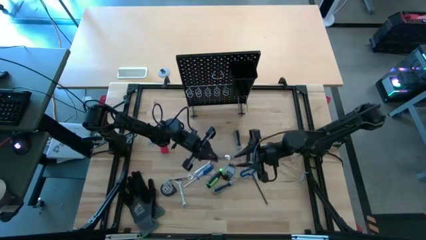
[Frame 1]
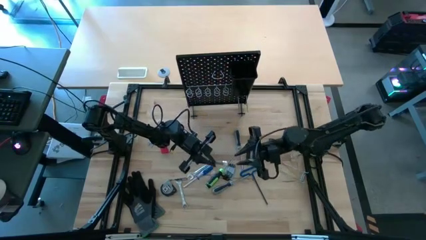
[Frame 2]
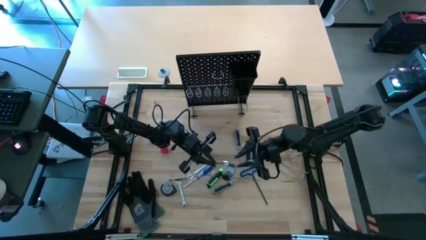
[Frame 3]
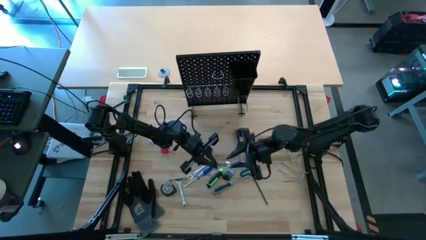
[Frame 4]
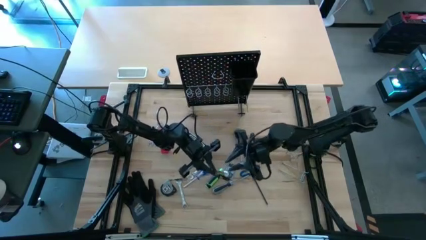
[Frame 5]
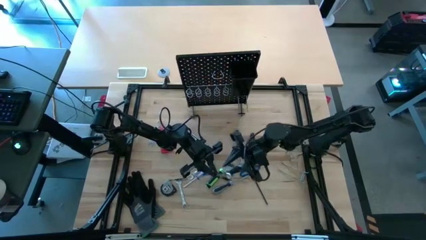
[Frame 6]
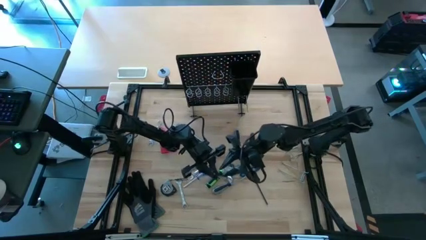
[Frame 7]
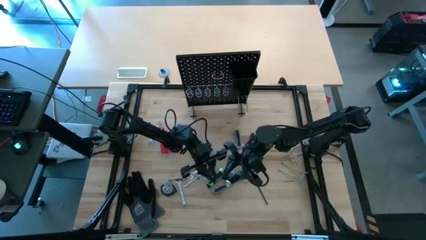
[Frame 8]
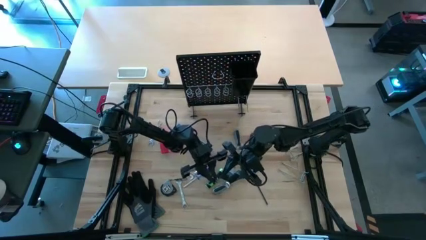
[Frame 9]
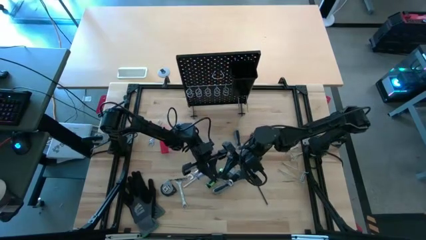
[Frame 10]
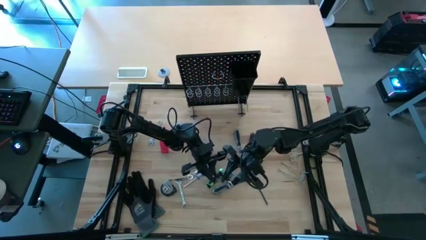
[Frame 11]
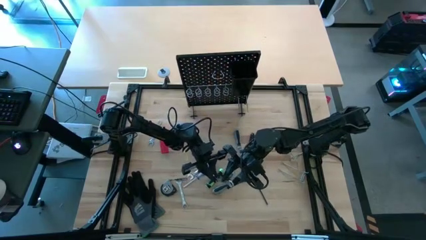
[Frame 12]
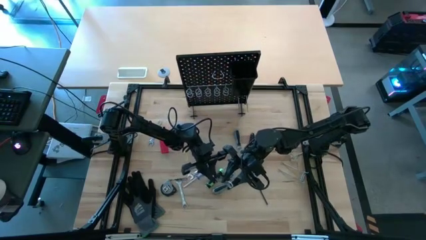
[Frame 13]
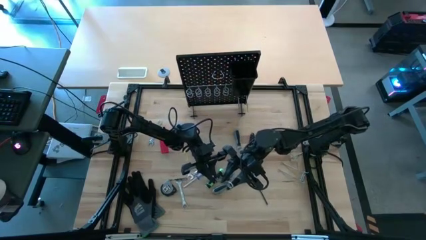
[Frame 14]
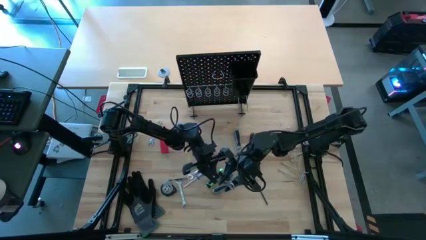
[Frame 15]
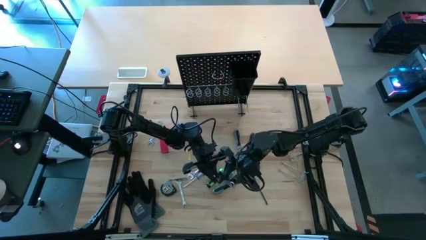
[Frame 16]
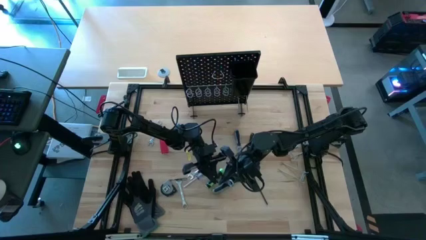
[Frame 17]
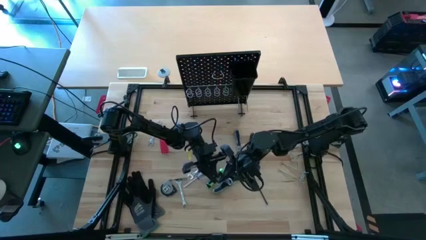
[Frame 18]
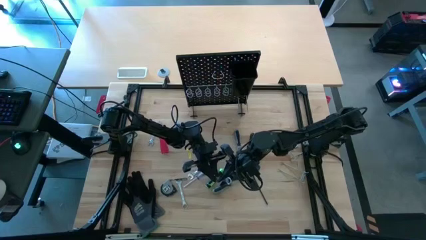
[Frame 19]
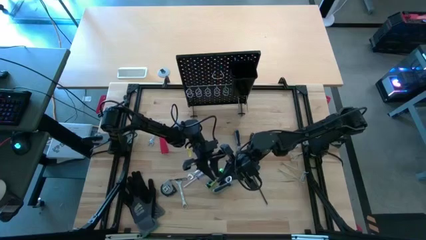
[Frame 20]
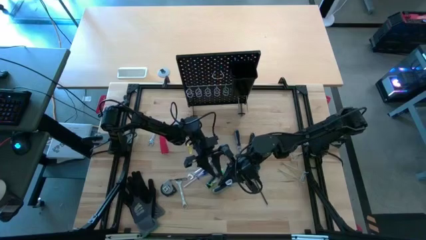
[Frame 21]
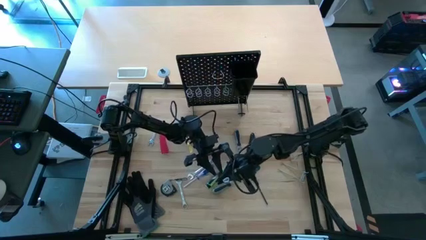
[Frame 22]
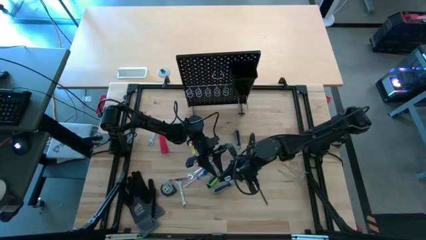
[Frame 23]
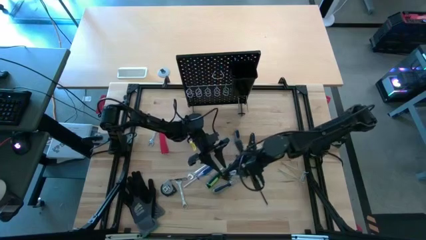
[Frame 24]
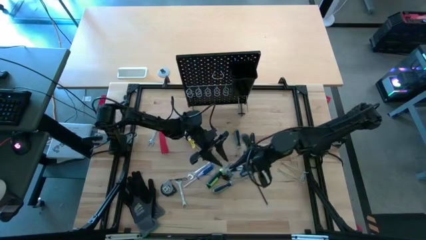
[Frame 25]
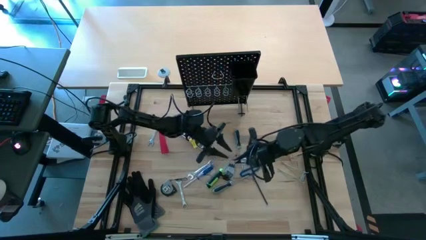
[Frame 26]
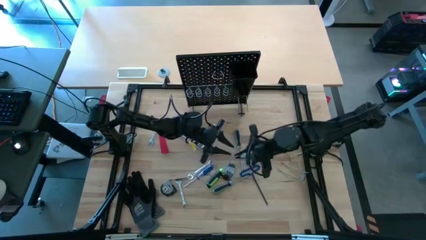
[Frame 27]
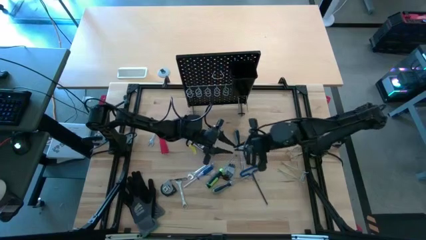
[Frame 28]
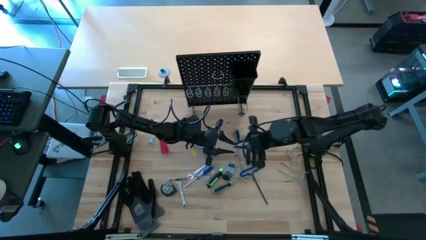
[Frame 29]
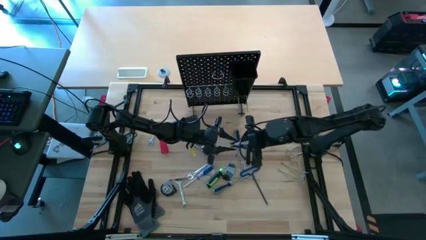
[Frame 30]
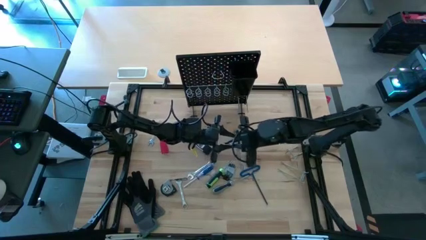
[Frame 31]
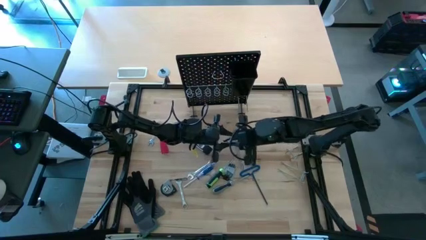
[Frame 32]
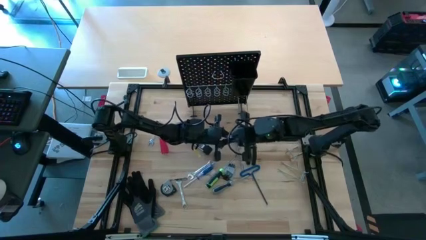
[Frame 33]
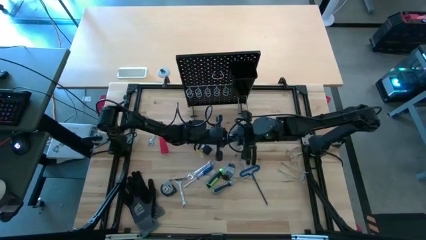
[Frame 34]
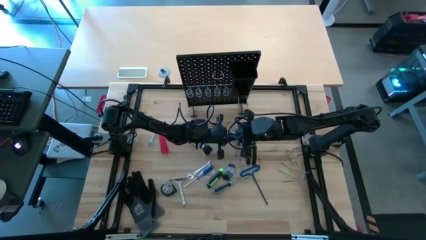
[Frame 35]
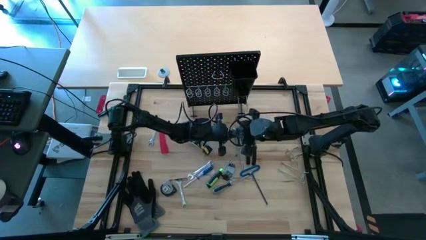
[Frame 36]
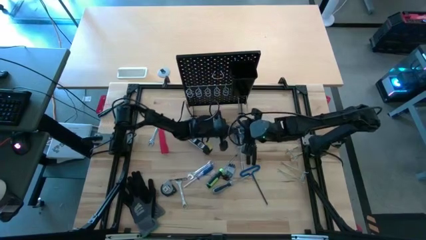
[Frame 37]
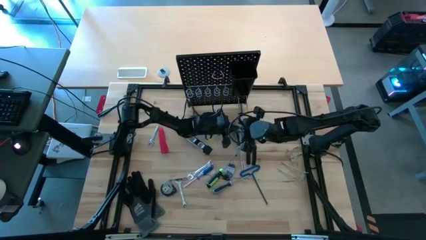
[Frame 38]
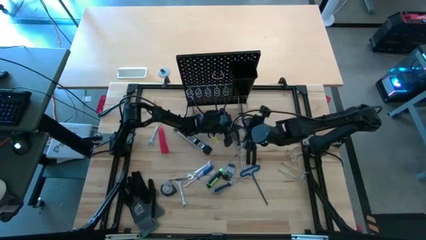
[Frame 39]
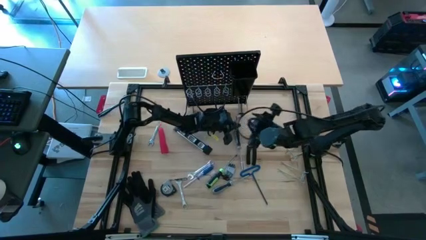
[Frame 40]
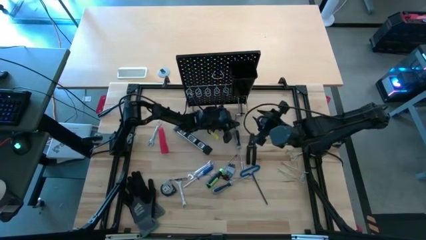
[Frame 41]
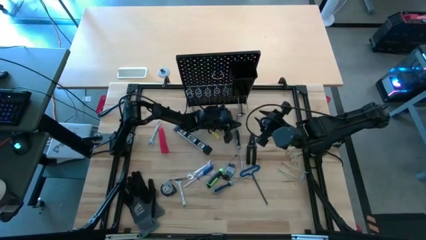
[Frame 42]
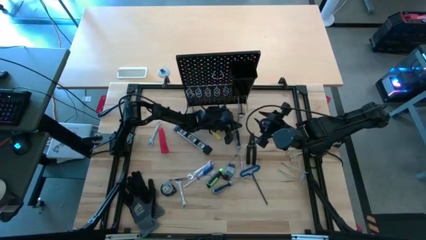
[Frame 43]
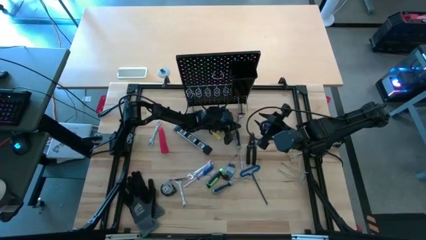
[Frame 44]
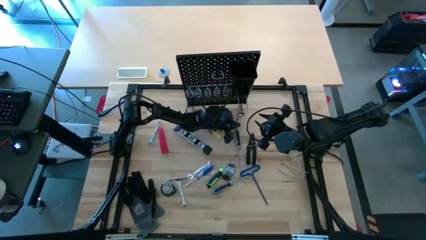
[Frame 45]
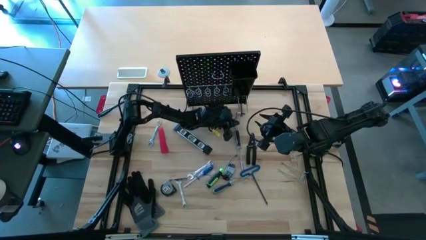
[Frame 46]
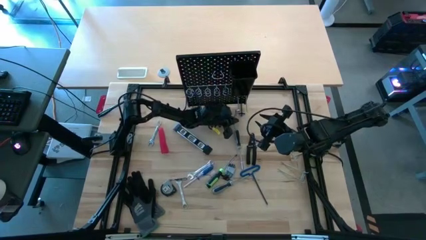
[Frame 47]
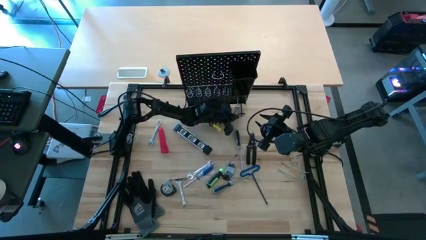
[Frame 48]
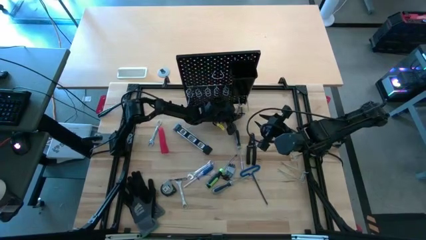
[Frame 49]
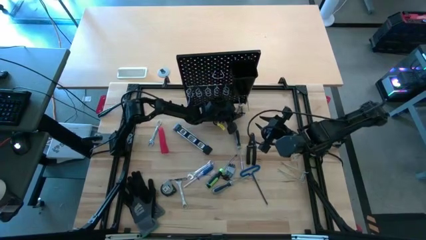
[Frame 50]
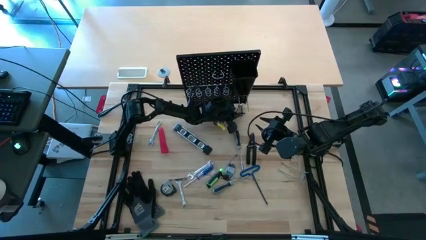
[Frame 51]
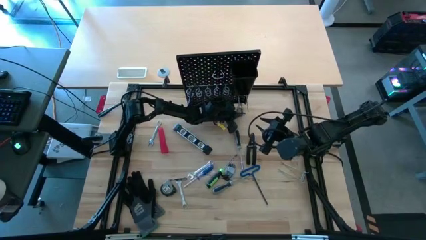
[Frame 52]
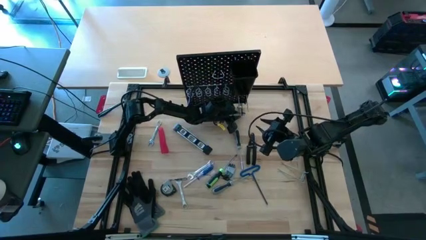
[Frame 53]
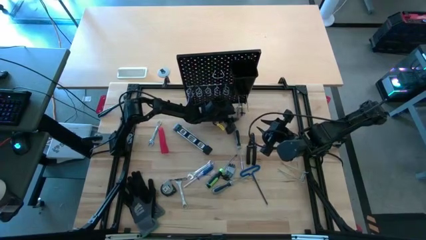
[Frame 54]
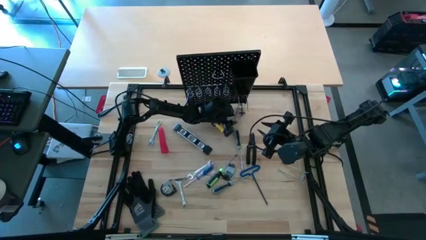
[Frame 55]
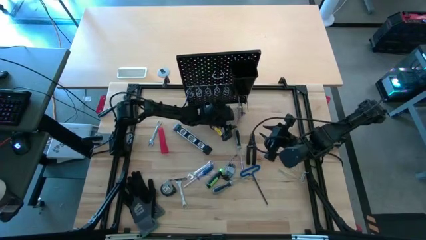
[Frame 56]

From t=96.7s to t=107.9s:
Task: Hang tools onto peg board
Hang the wrench onto the pegboard

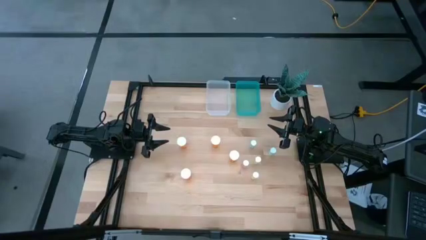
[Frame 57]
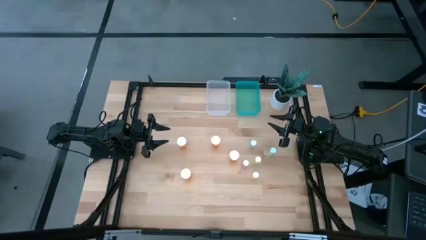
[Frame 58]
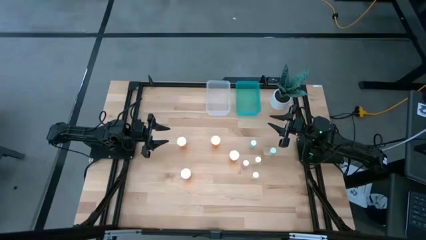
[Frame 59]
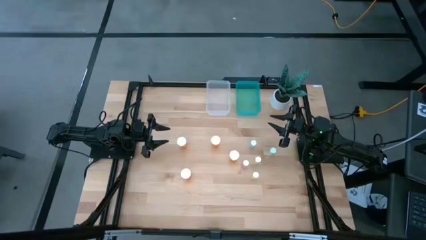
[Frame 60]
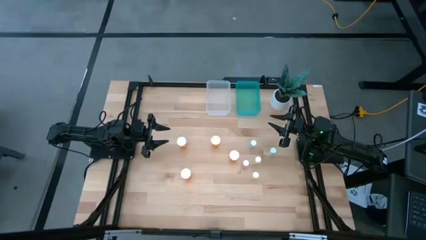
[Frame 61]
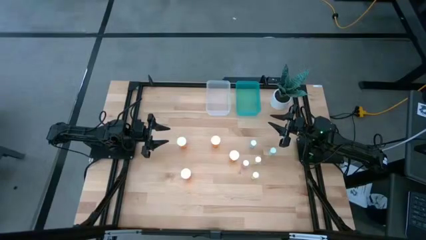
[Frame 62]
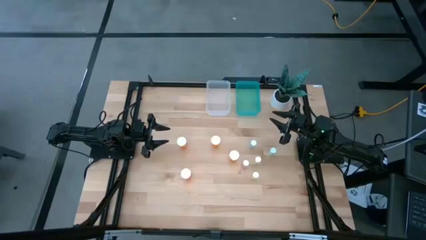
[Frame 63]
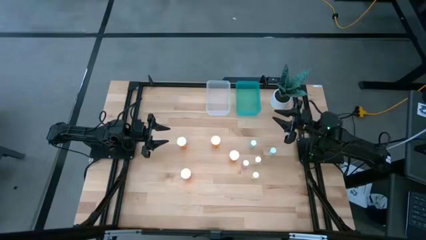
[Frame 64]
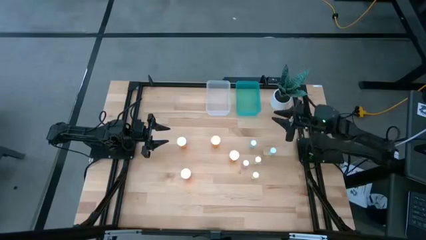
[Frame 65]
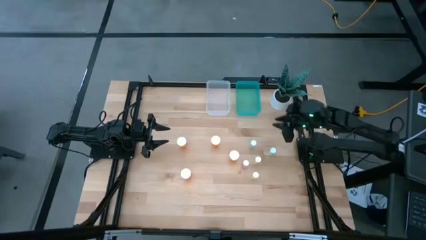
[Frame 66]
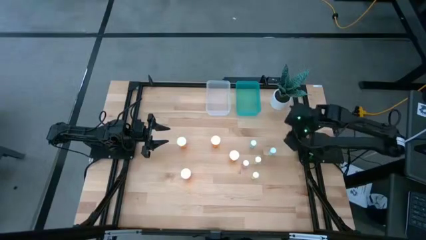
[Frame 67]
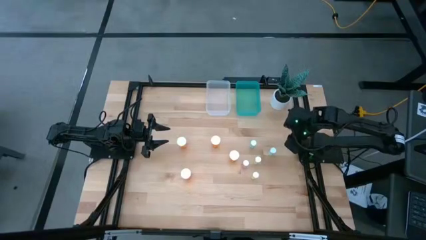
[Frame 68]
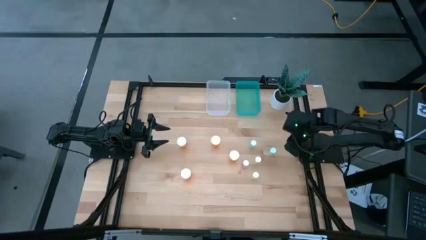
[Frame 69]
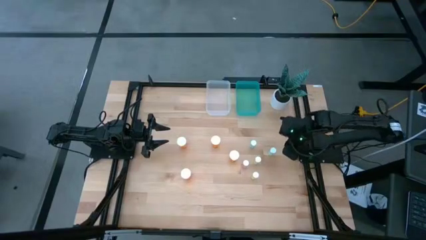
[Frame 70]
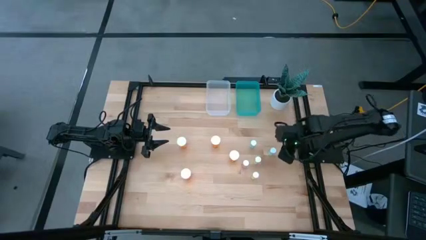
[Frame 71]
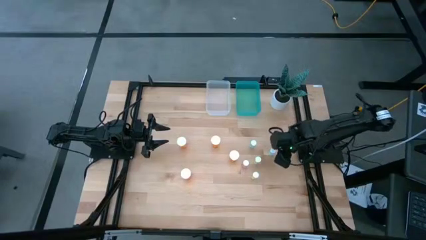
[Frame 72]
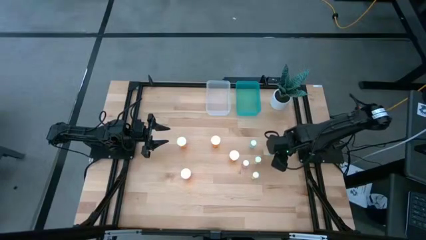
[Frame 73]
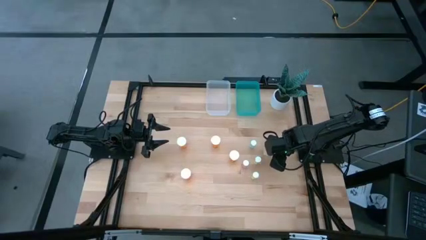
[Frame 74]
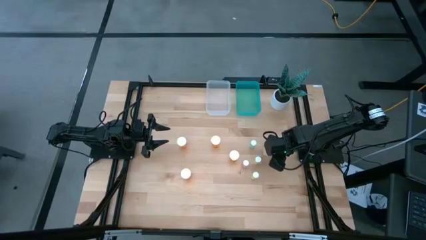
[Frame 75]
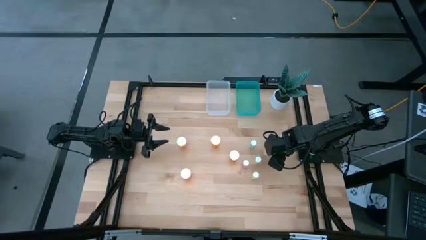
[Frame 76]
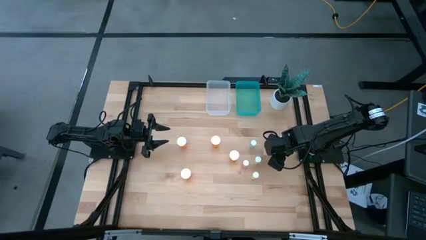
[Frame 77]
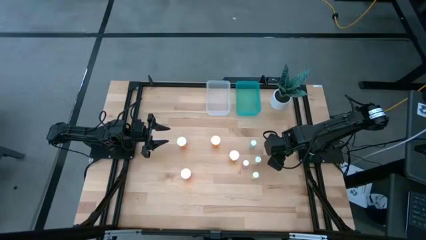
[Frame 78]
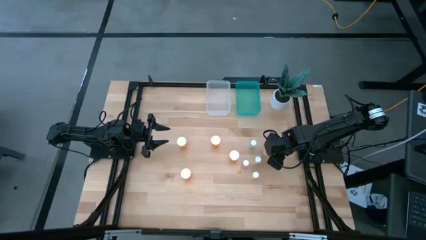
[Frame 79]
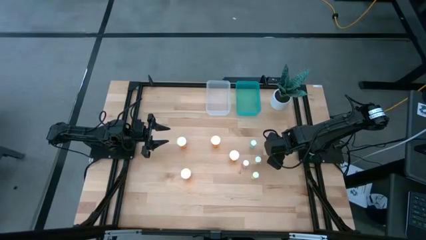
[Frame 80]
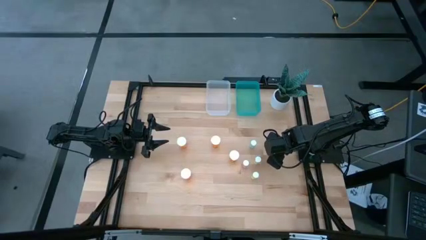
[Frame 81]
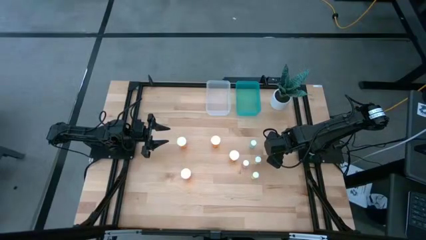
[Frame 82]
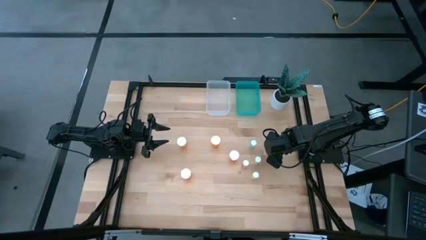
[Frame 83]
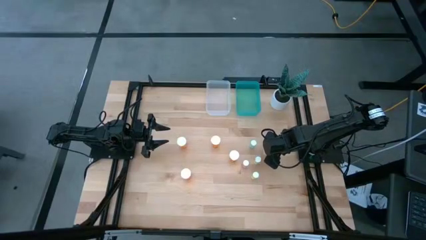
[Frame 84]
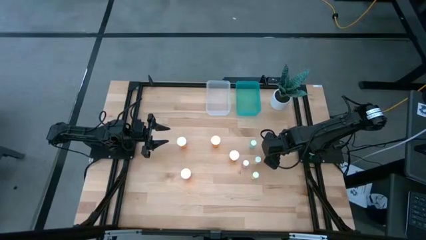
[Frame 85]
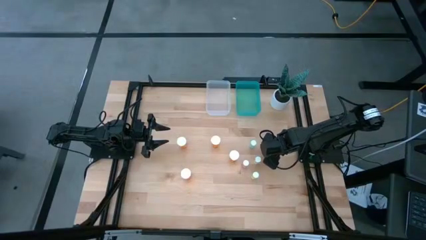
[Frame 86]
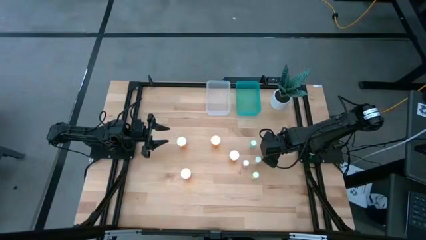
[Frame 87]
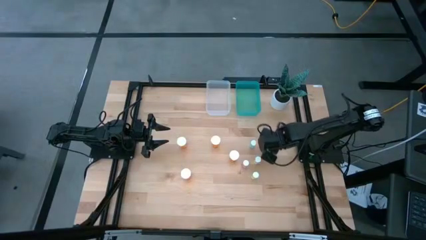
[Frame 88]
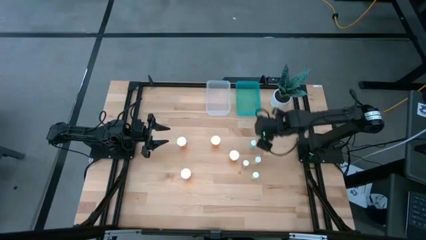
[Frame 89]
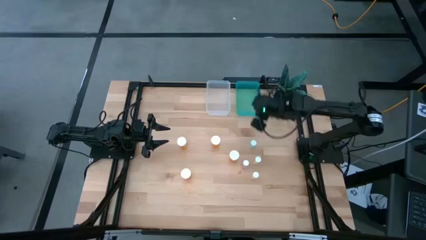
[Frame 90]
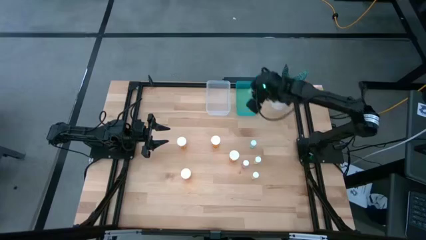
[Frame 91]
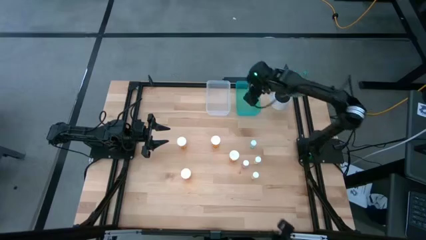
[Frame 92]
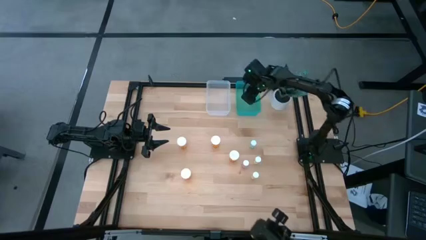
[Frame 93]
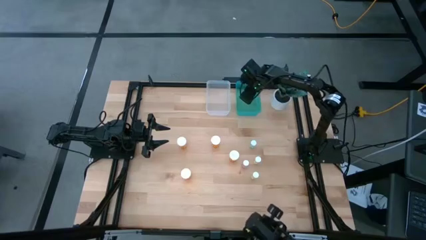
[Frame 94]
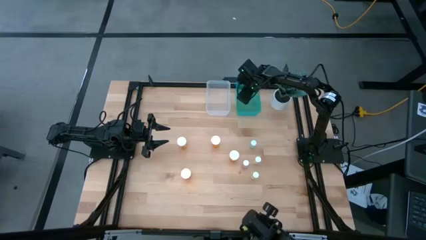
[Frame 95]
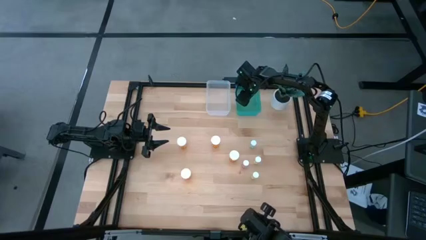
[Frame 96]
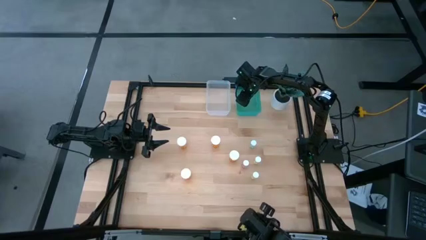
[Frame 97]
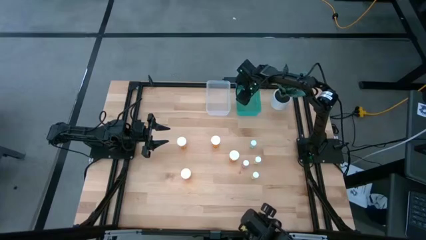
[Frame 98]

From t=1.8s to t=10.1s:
Task: Pick and place medicine bottles into bin by pill shape (circle, oval)
Put the small blue pill bottle into the blue bin
